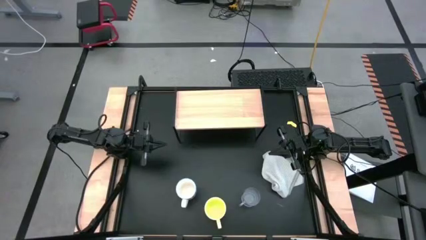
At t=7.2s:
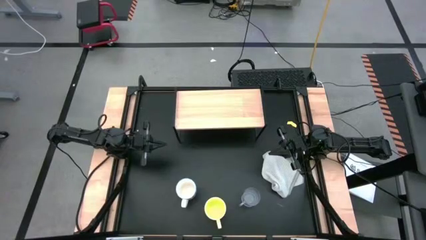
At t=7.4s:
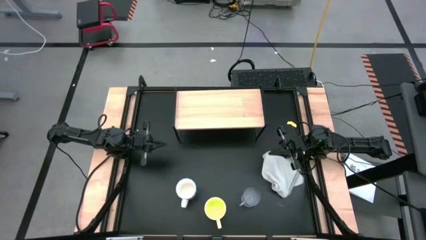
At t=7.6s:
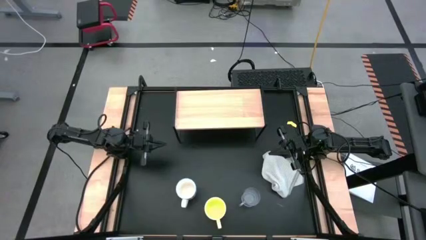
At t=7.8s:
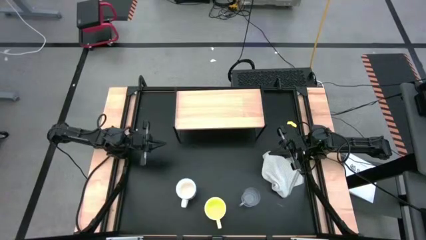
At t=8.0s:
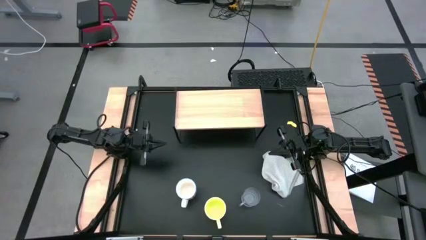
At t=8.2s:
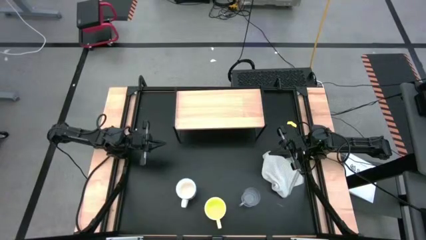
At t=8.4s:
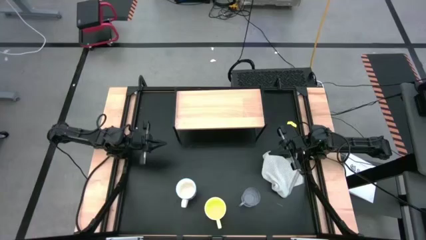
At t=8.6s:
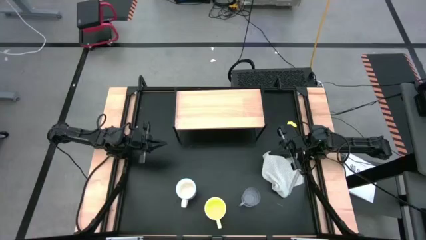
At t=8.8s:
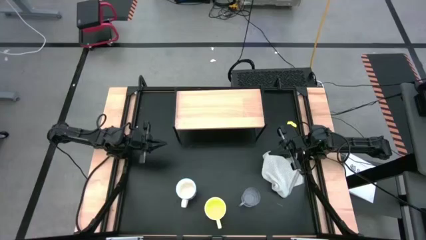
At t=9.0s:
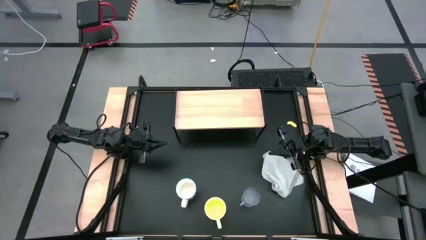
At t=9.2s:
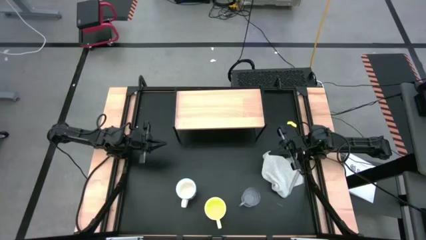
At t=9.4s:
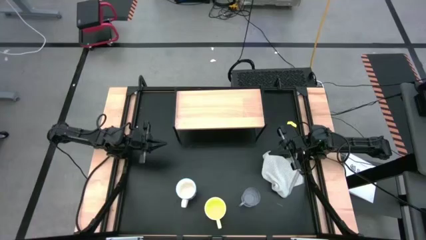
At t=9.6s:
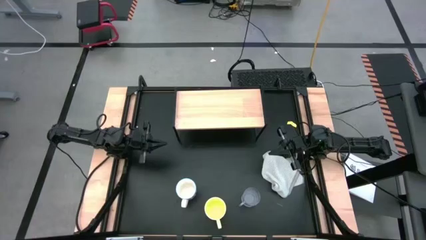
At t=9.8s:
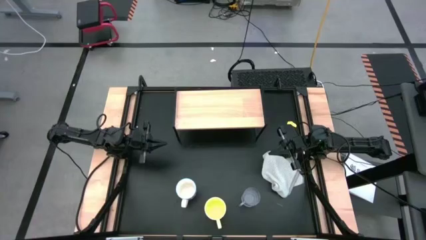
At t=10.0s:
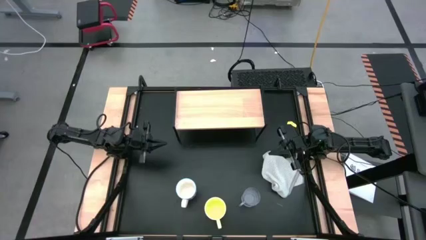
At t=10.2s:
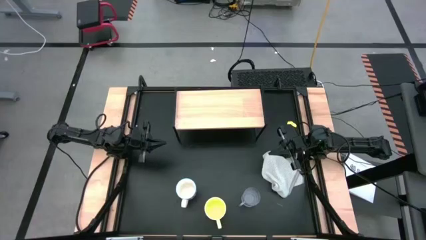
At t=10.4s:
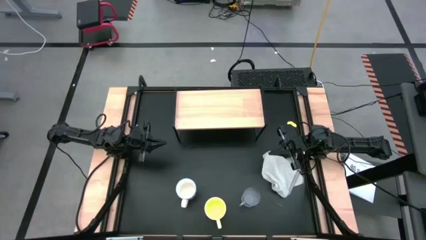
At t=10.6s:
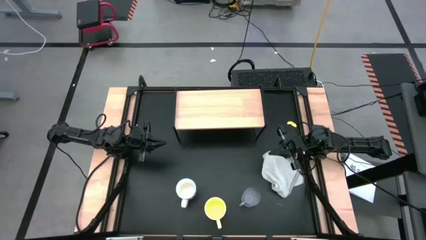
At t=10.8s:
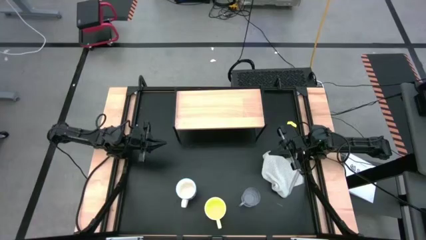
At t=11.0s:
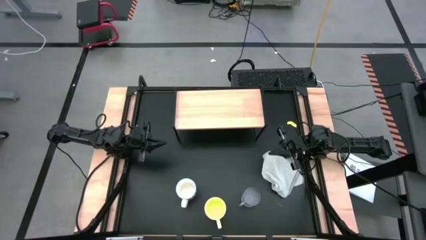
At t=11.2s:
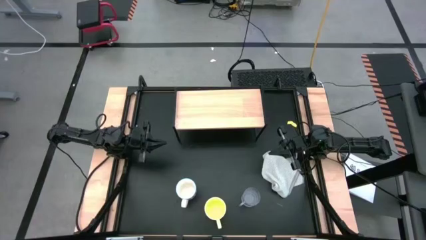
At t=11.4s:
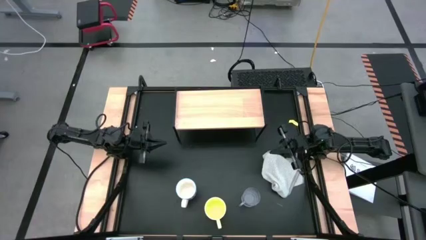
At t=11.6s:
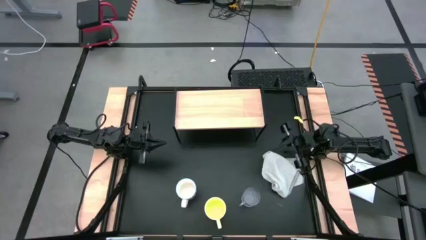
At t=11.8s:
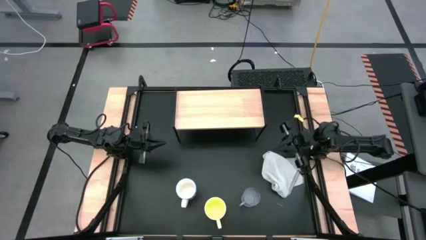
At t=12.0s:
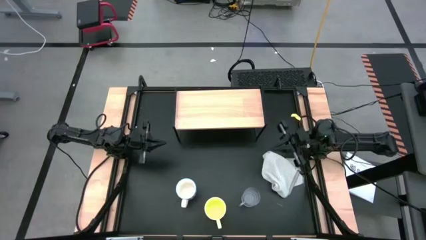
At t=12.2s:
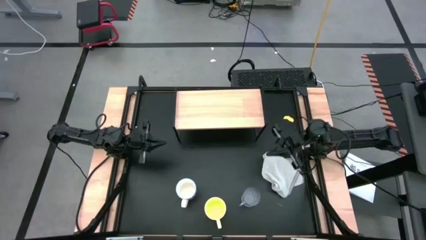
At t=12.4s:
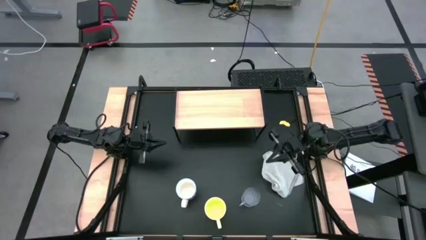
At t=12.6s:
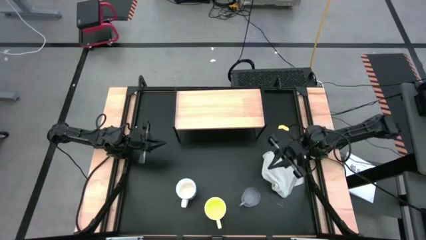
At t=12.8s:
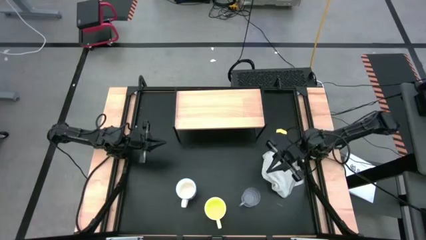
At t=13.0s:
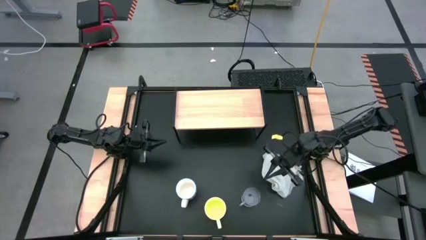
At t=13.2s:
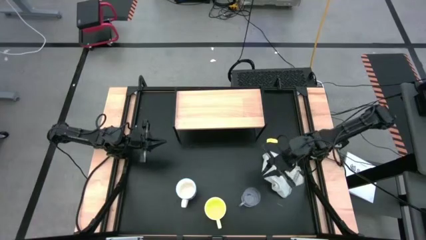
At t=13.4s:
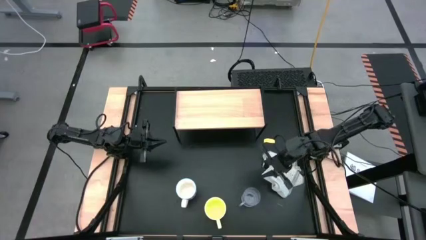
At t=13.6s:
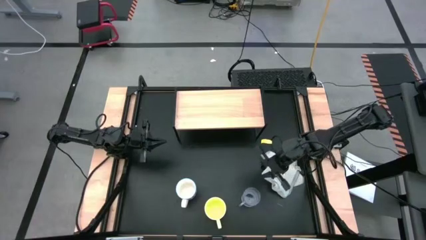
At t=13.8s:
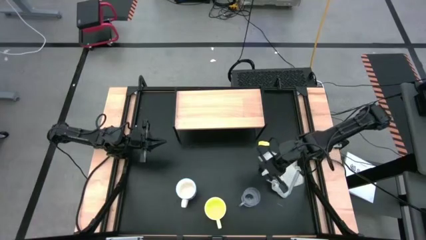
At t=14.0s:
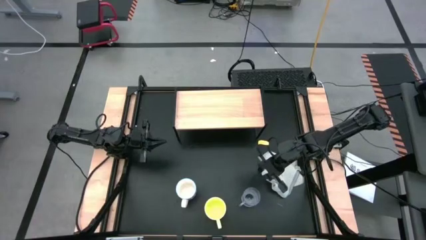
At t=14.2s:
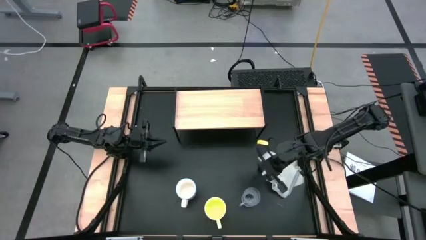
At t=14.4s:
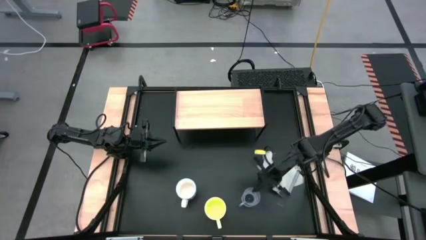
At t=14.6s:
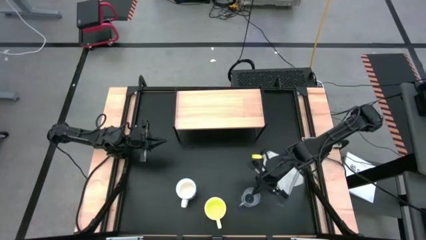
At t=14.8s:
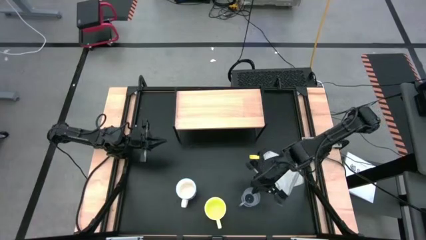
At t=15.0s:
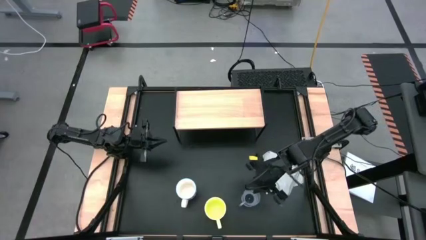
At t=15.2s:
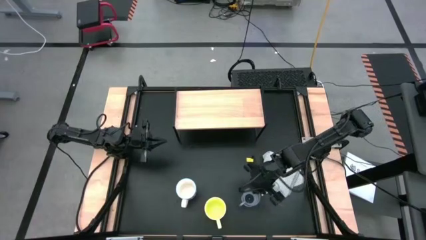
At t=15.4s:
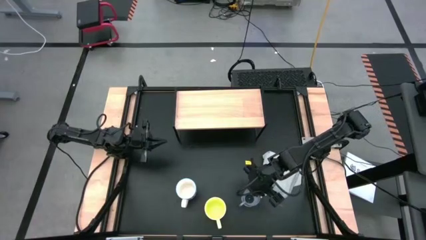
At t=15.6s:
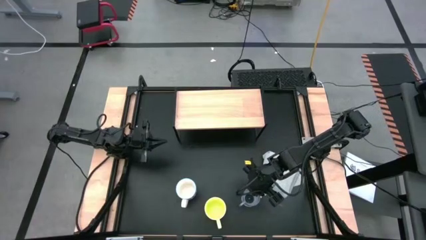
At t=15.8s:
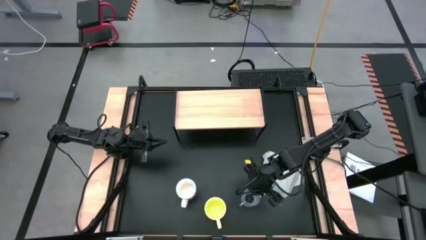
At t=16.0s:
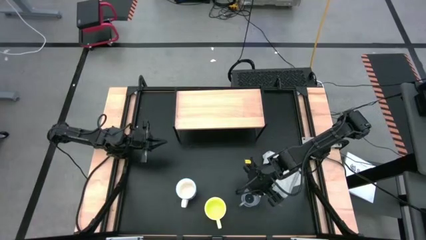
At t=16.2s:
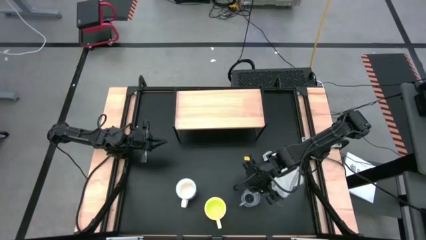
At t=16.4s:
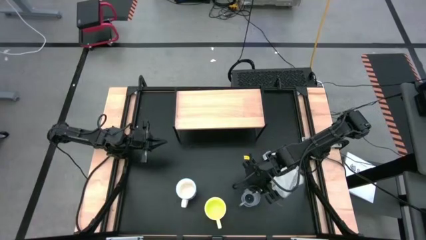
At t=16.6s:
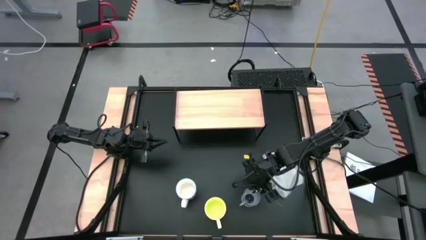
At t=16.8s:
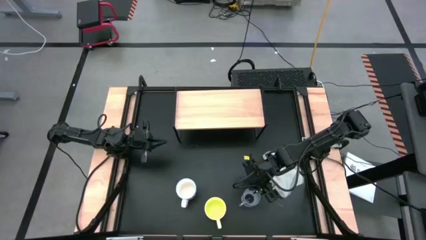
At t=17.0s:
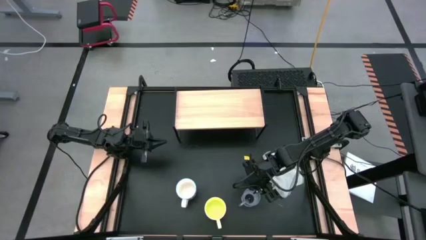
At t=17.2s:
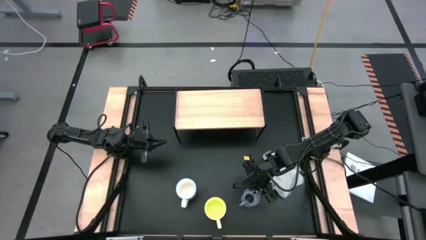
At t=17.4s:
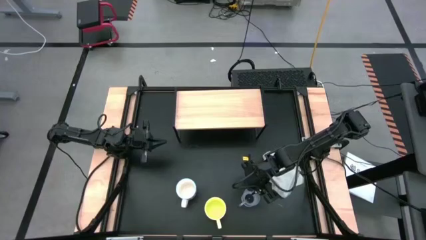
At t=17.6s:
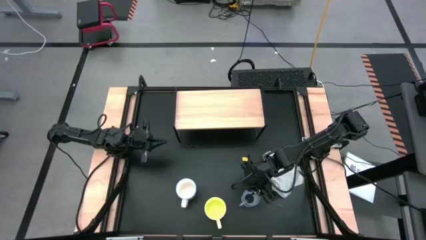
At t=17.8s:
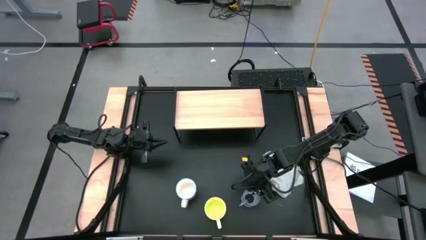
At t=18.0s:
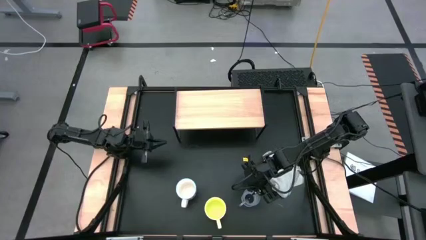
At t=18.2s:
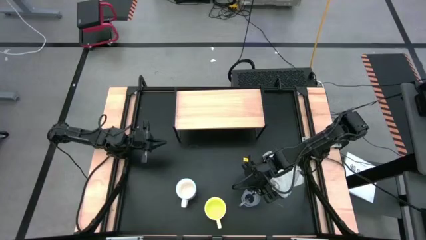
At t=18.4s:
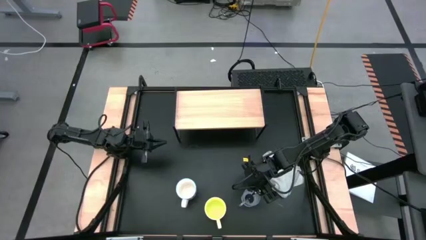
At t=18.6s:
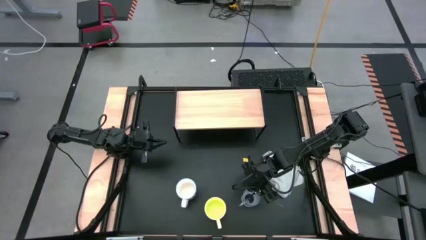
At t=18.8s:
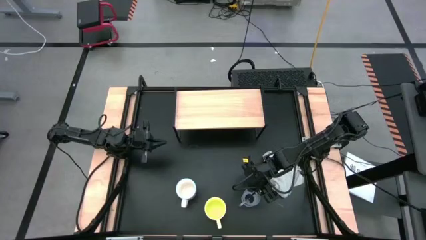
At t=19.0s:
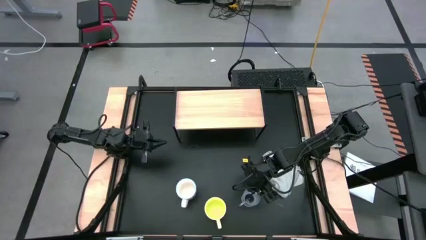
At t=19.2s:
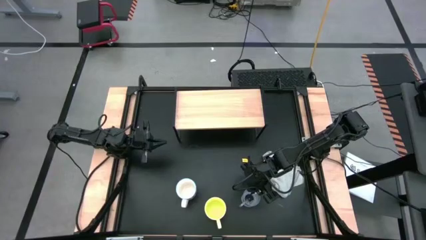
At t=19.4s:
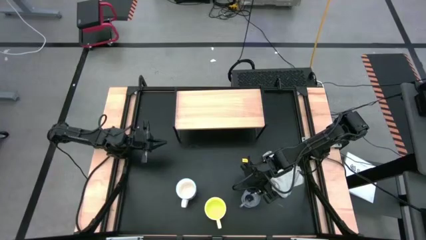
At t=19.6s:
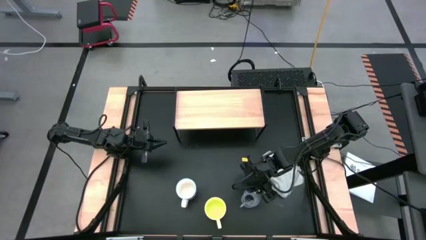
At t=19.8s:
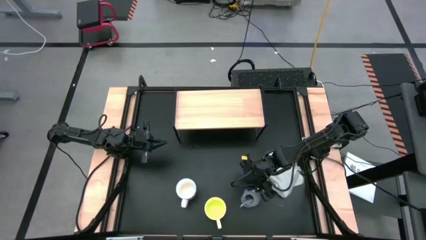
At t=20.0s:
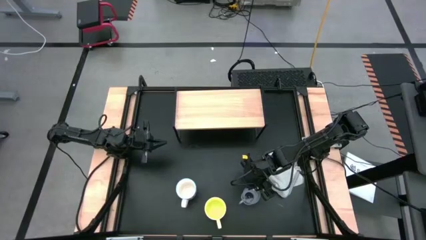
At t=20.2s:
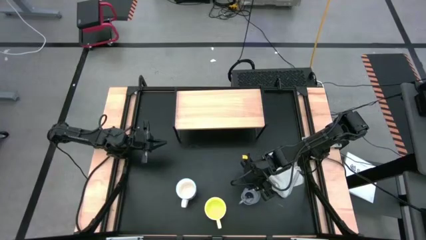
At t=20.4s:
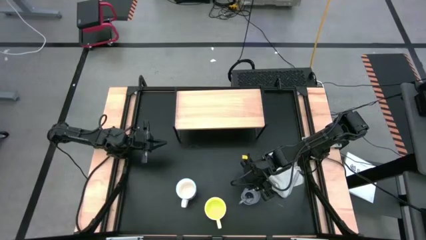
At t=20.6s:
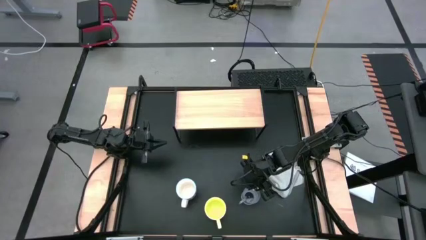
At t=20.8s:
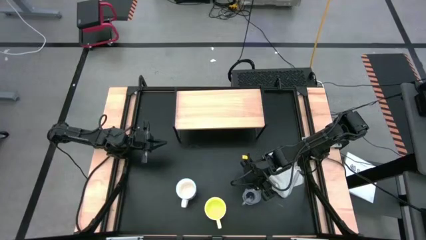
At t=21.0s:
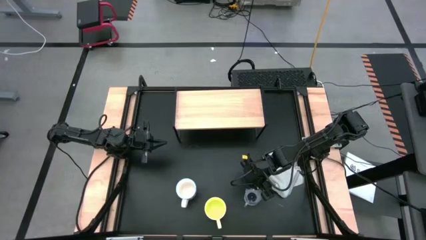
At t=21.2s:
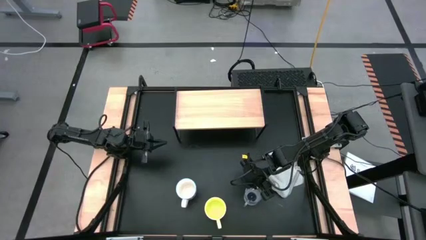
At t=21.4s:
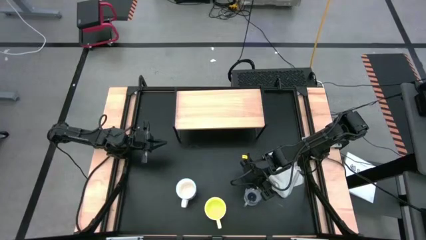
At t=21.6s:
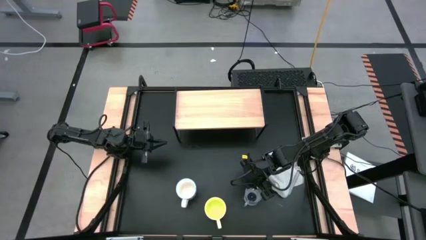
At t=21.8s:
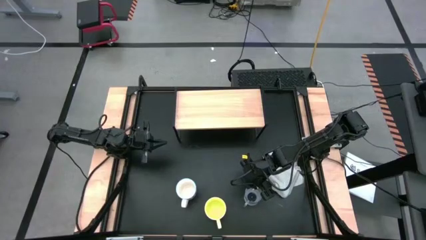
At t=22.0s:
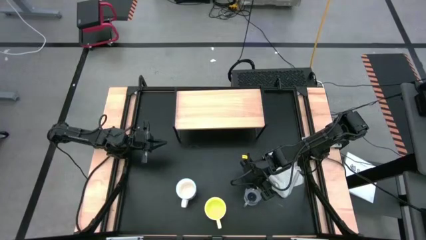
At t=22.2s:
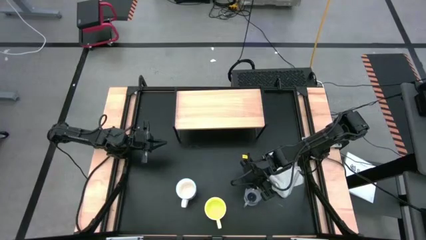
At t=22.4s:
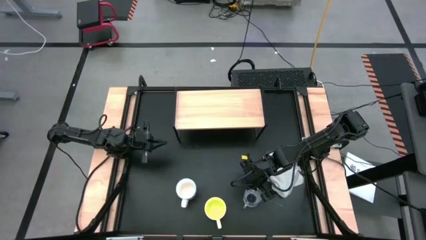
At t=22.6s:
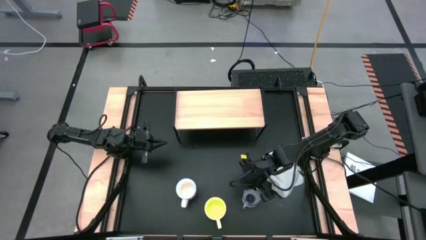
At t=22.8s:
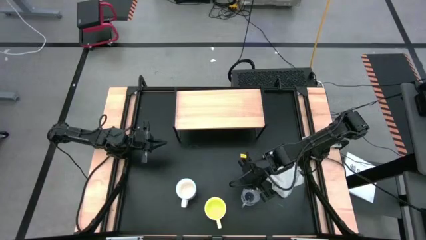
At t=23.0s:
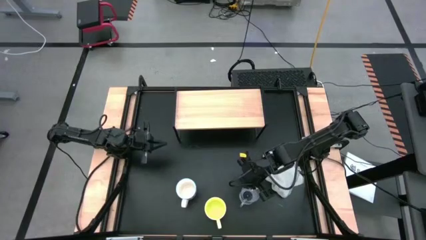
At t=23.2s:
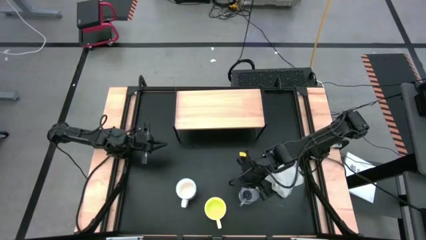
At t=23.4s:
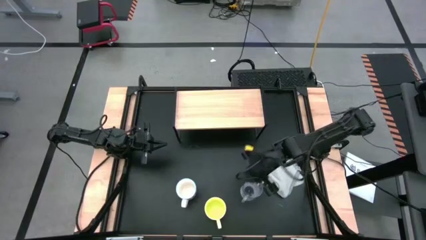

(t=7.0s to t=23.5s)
Task: Stack small to large cups/mugs on shelf
Put the transparent mug on the shelf
